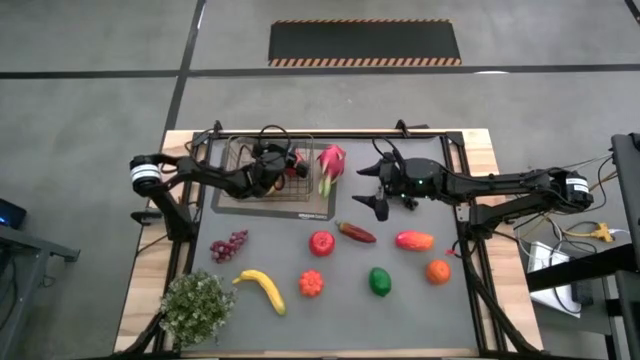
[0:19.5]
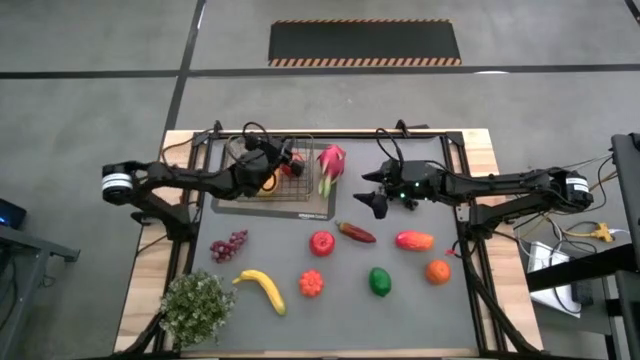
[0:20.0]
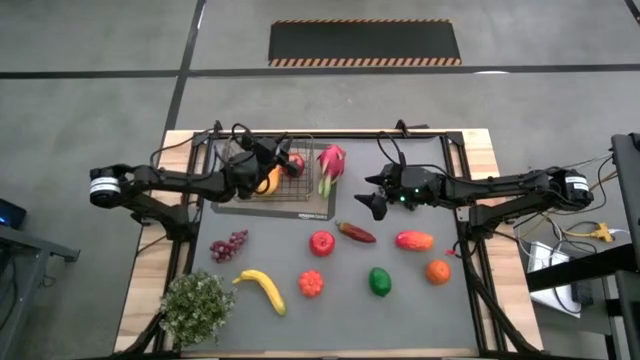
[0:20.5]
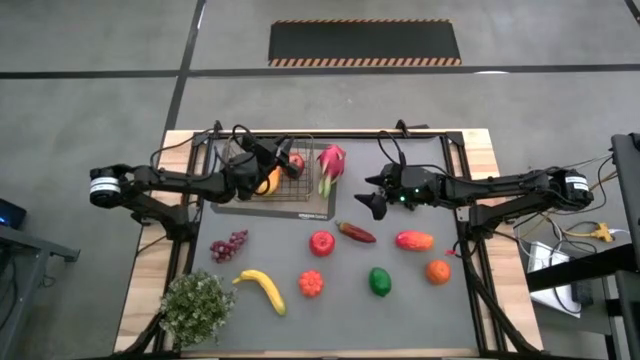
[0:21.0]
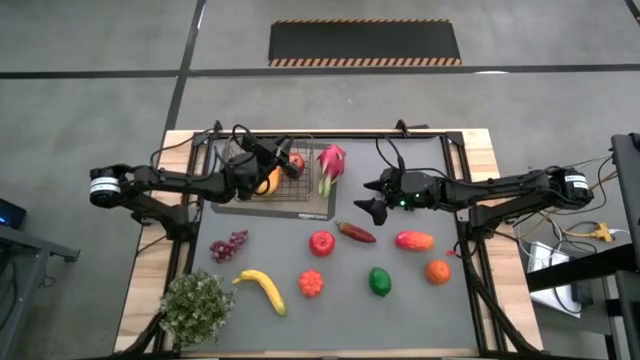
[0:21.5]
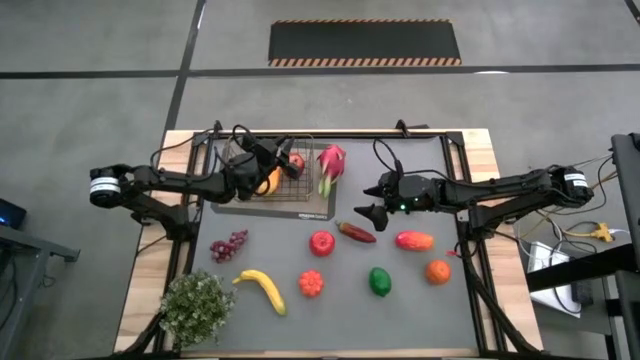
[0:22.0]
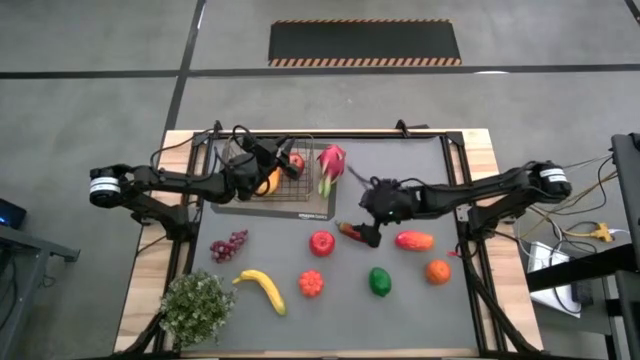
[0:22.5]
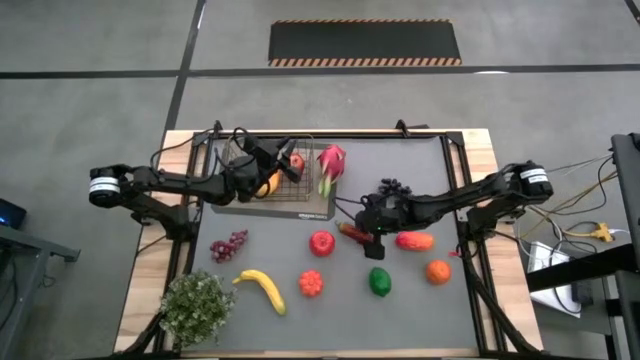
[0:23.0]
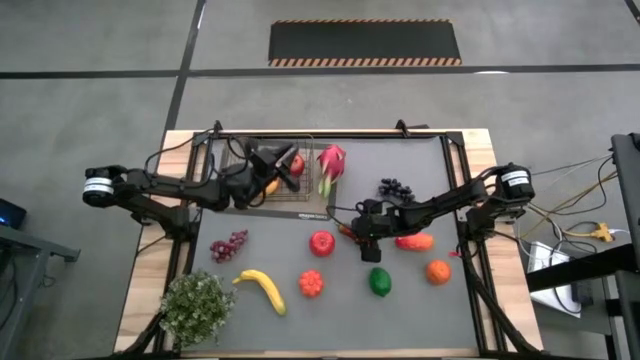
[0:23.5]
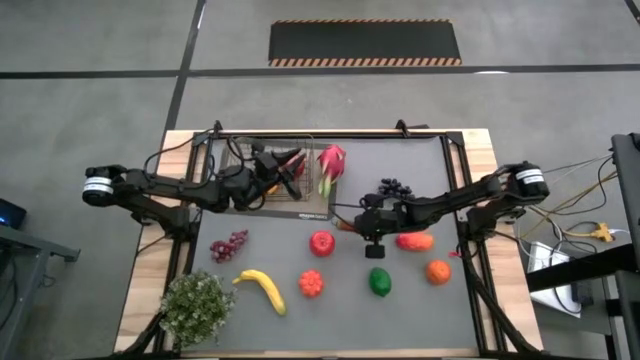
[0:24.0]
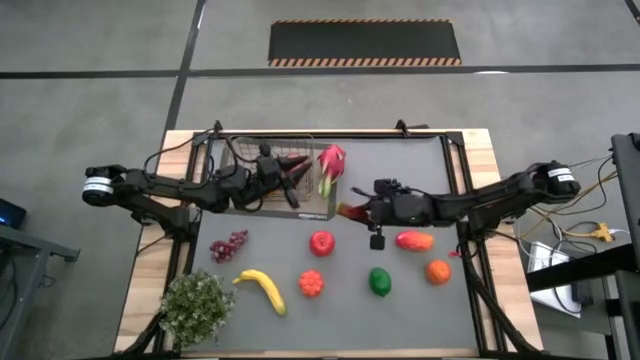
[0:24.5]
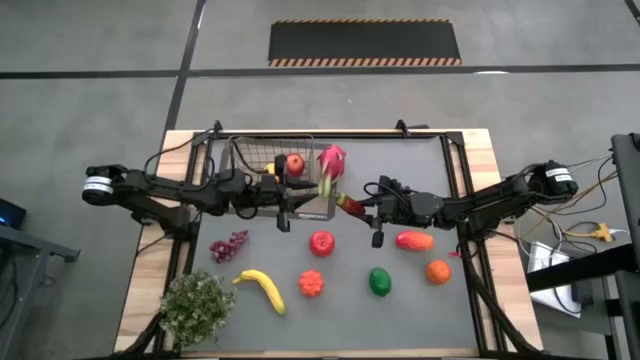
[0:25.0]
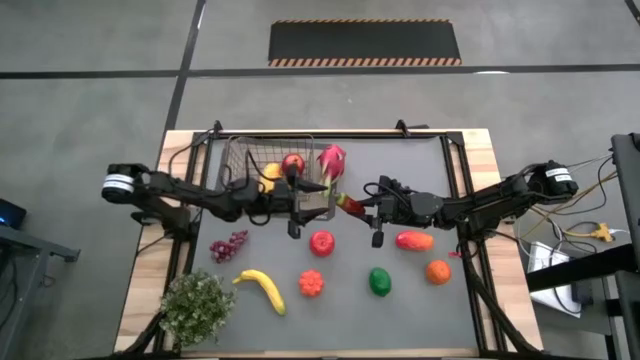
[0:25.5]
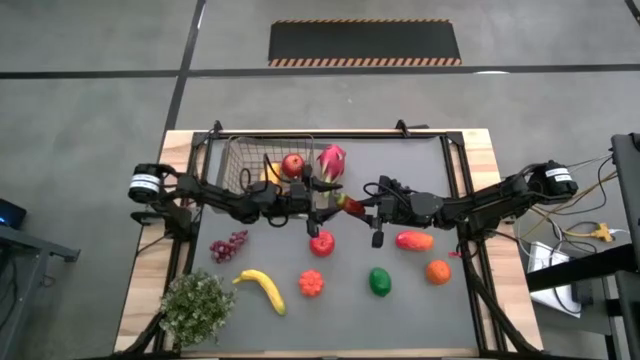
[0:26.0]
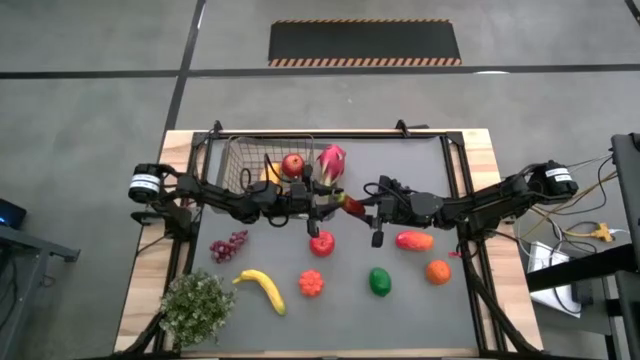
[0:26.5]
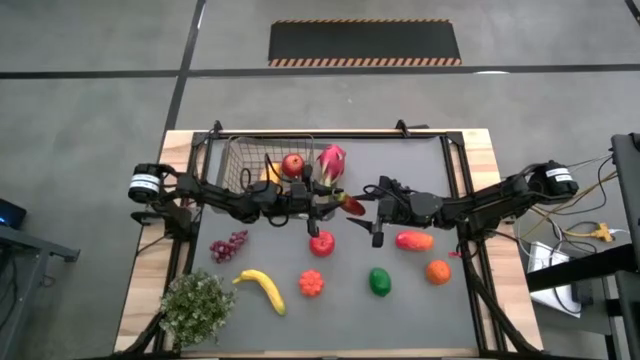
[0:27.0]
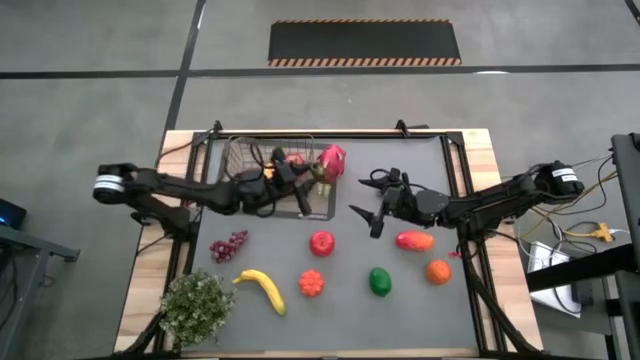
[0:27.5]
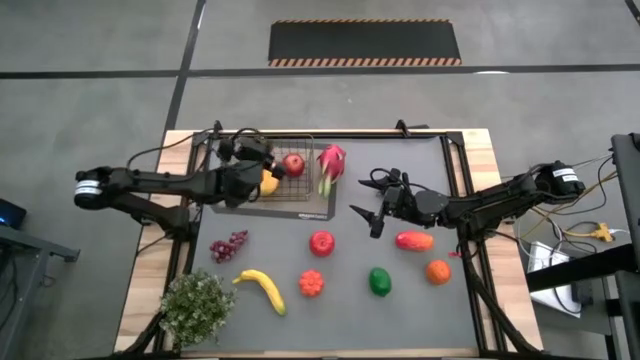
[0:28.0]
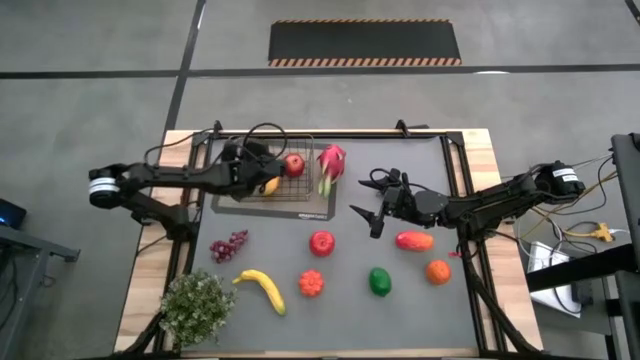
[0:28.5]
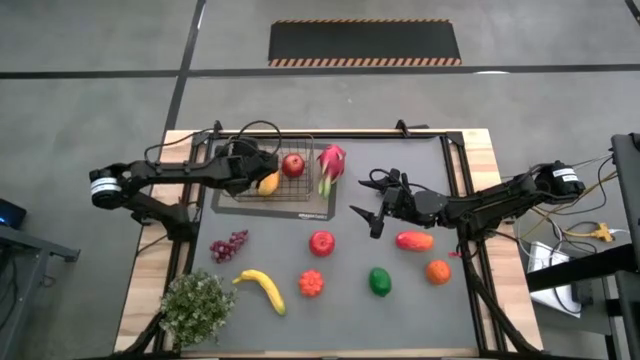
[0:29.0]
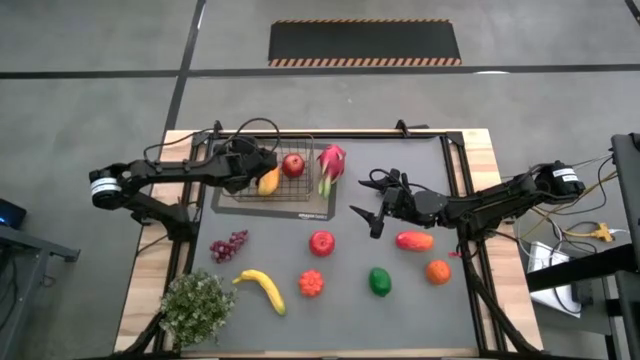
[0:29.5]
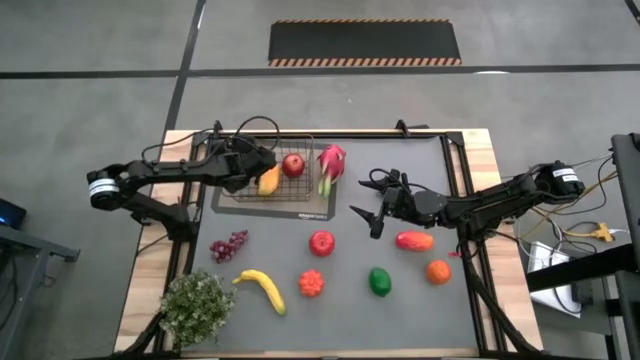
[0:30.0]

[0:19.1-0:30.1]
Task: Build produce basket
Put the red chili pepper into the wire basket

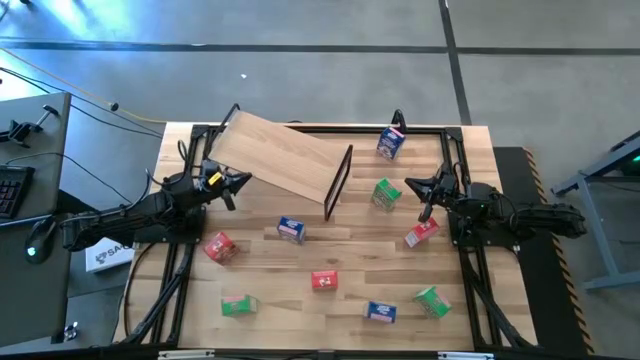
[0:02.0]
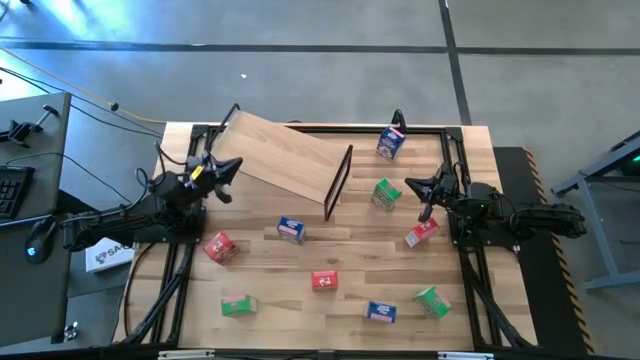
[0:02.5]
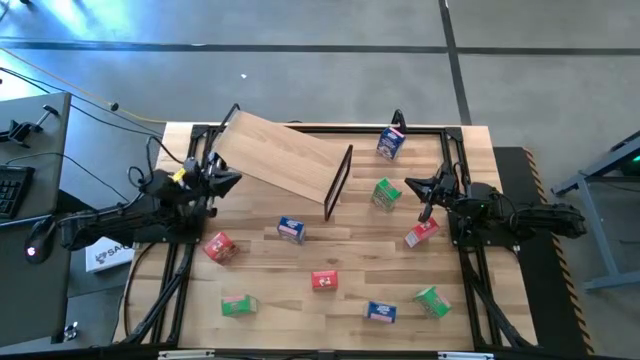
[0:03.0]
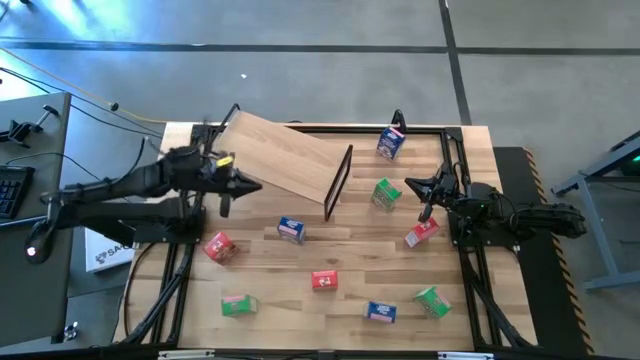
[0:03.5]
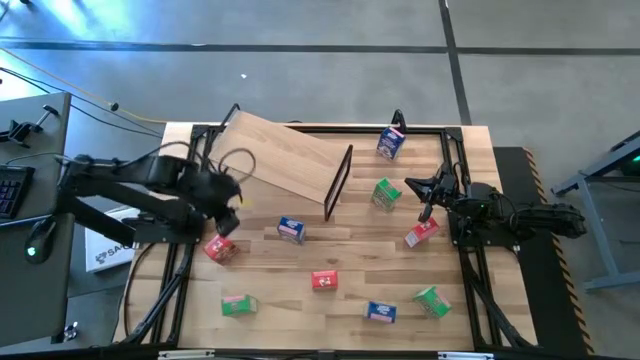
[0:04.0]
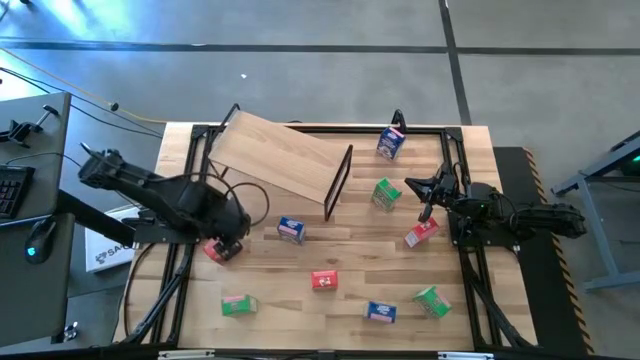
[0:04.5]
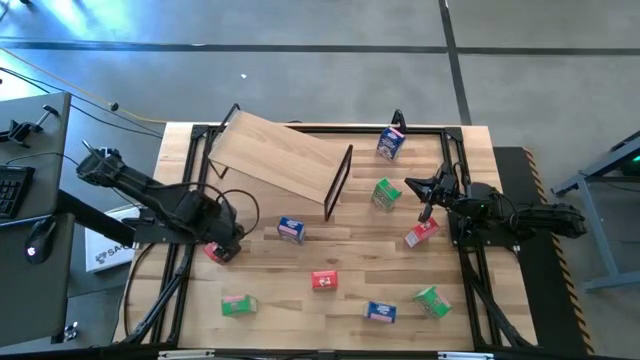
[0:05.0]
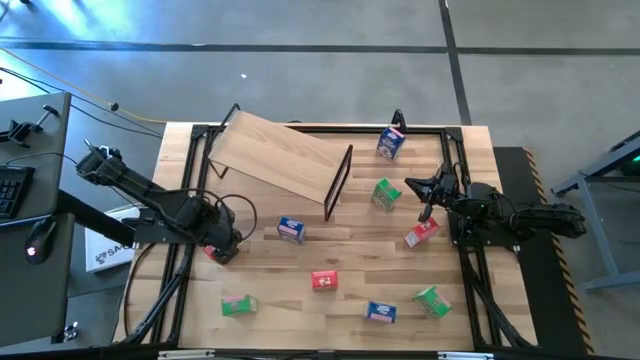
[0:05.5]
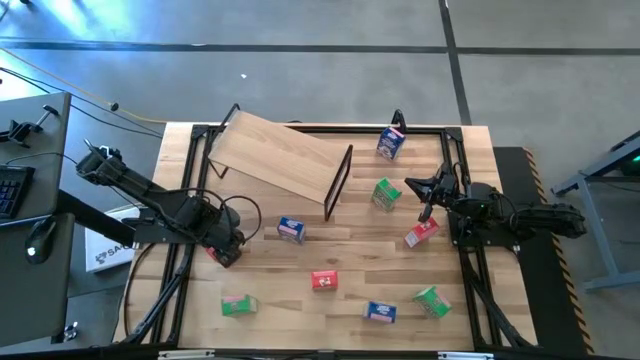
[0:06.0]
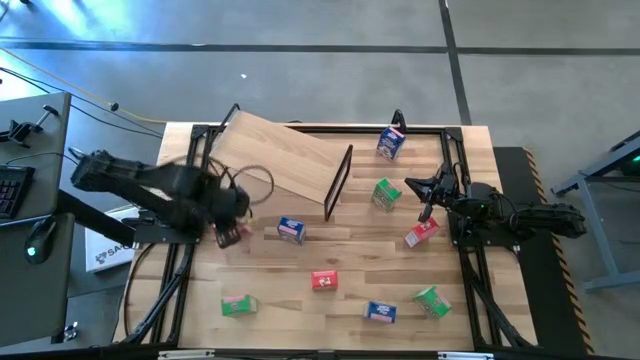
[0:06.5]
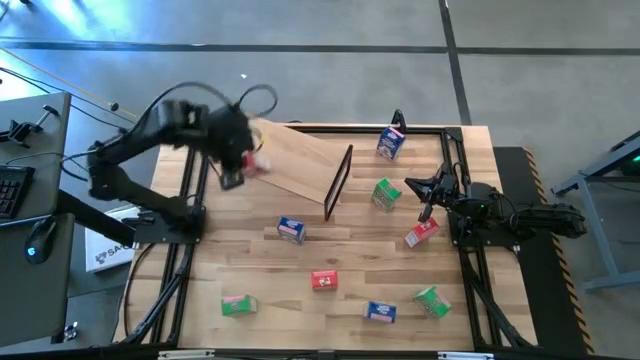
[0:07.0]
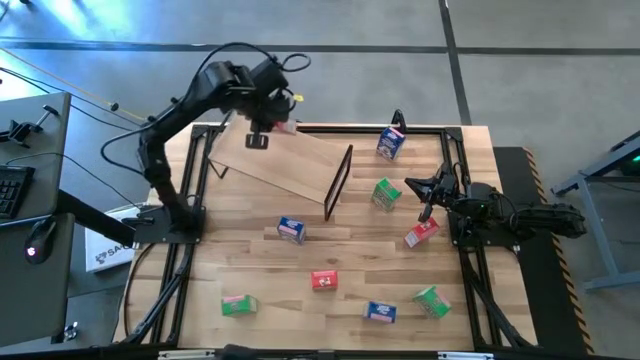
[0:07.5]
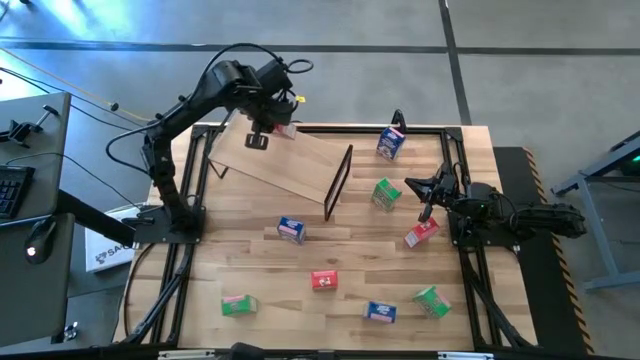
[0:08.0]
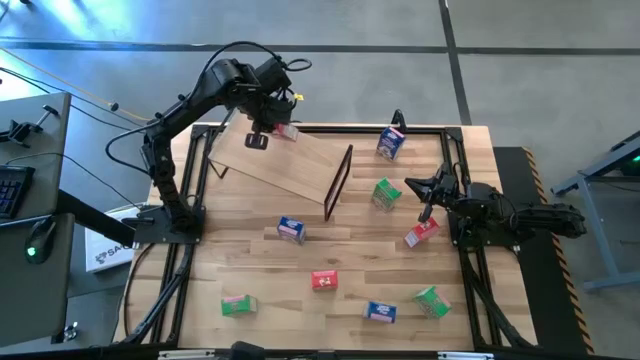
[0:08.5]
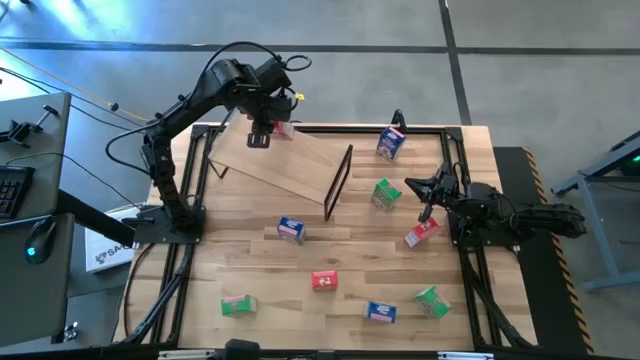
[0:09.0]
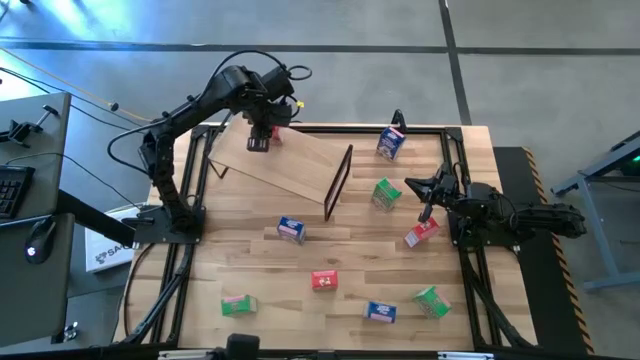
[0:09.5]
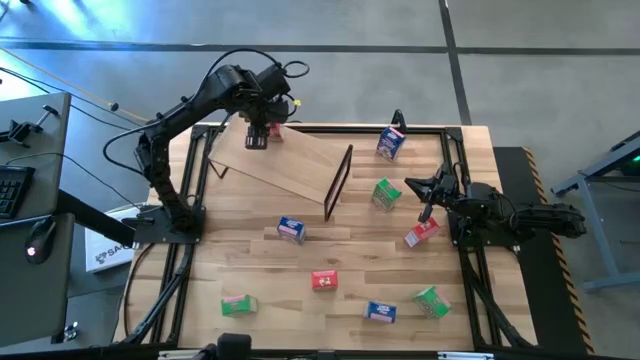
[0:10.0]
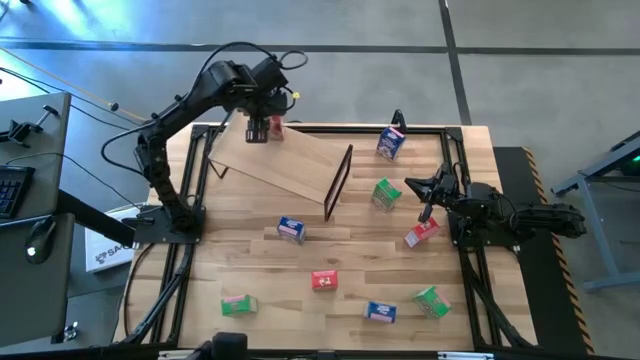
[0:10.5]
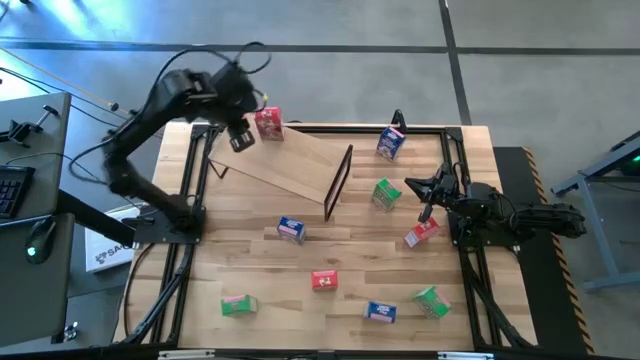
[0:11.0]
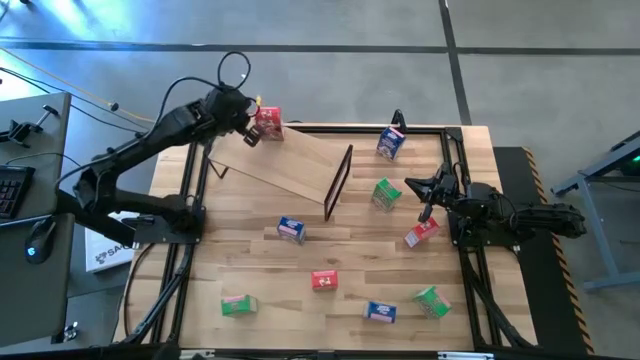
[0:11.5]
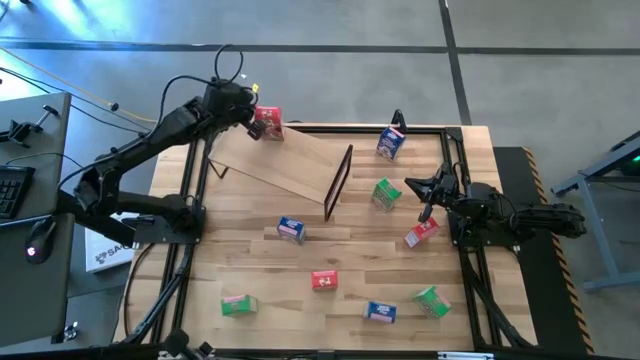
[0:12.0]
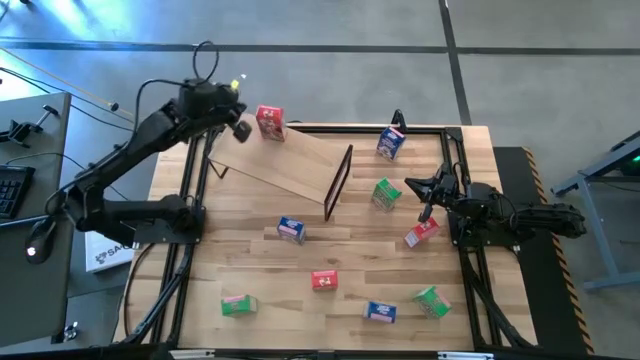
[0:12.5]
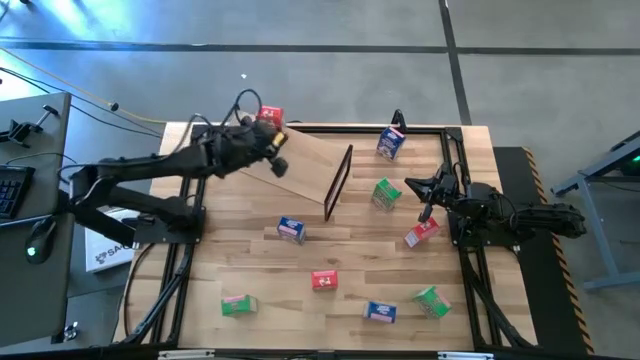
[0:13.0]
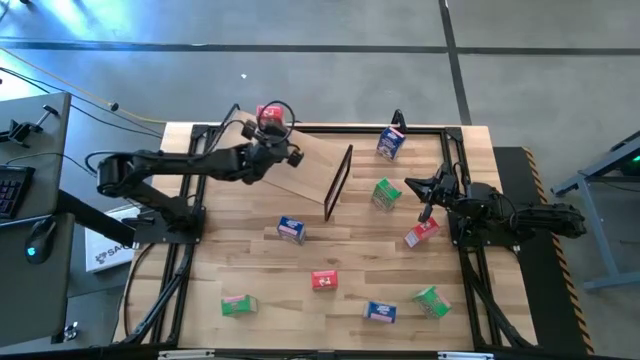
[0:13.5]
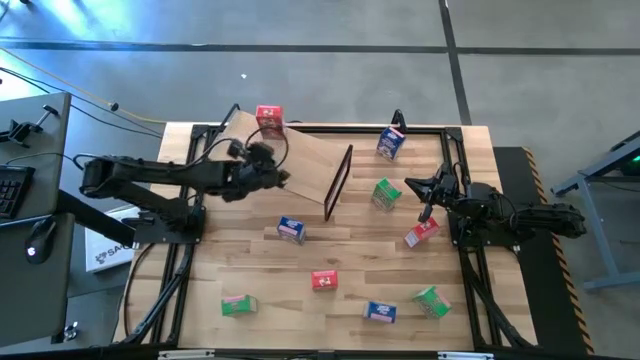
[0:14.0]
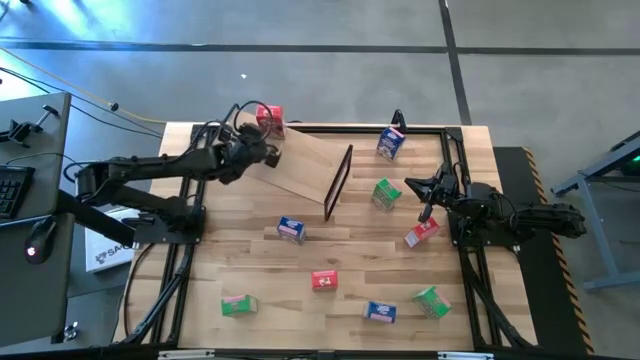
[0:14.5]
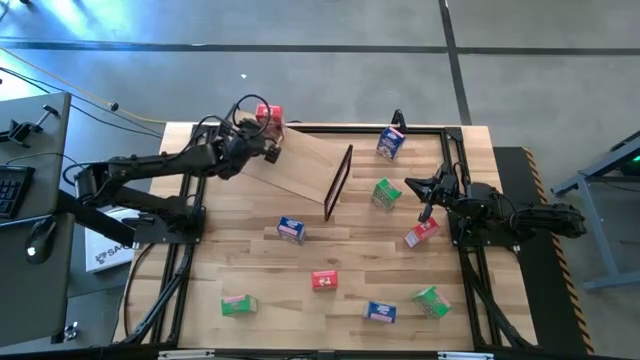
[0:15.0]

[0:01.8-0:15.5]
Task: Stack cereal on shelf
Put the top left red cereal box on the shelf
